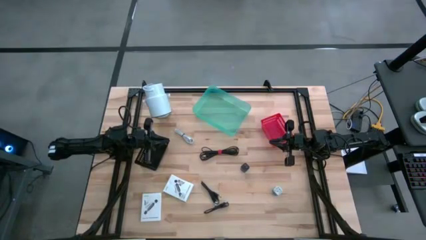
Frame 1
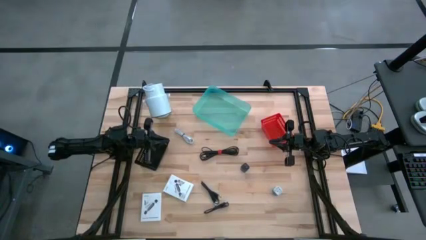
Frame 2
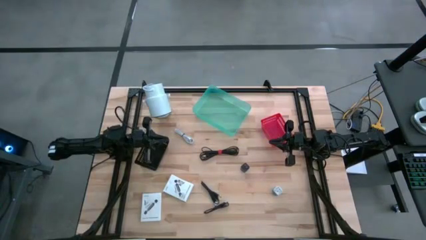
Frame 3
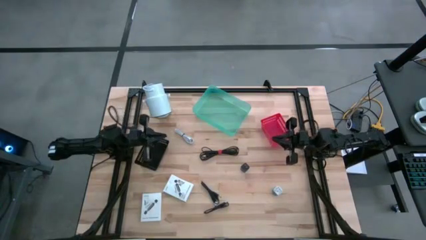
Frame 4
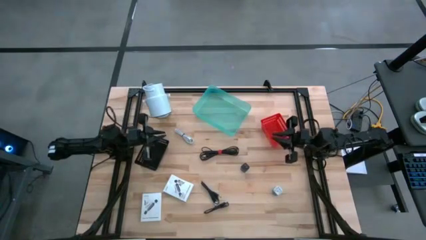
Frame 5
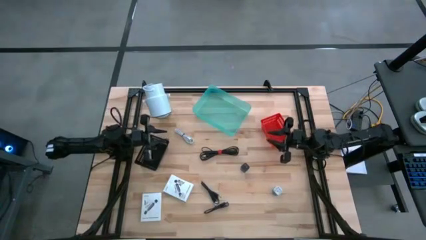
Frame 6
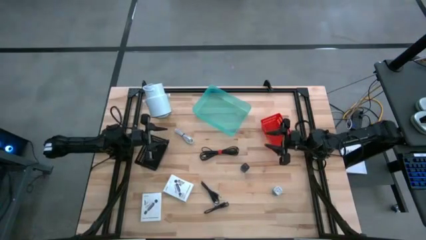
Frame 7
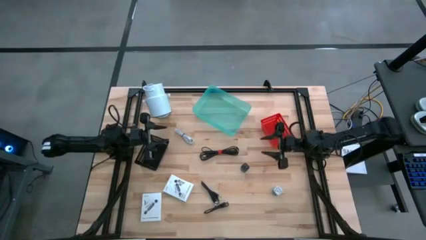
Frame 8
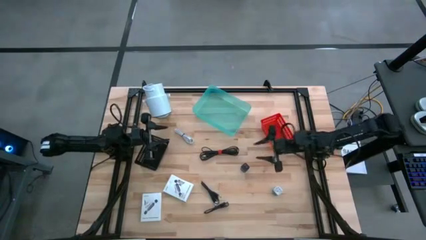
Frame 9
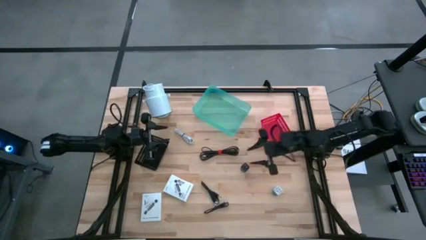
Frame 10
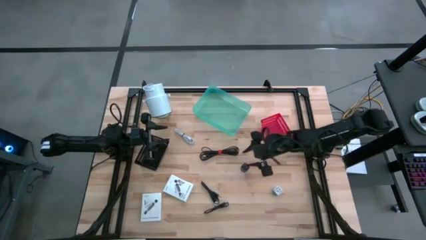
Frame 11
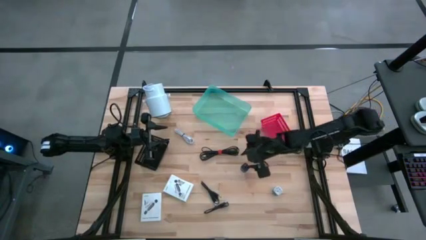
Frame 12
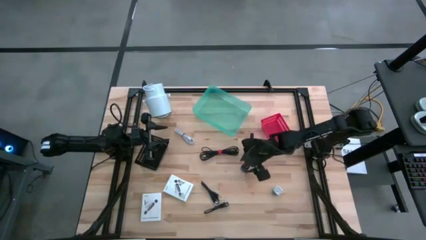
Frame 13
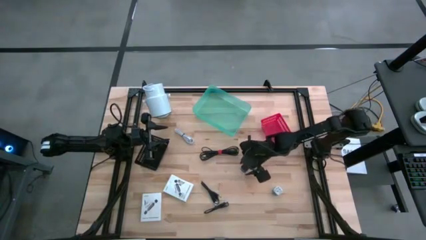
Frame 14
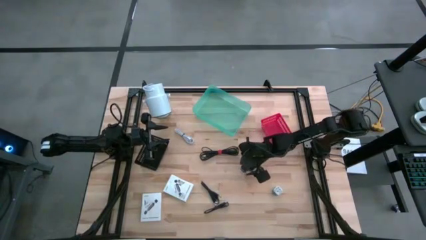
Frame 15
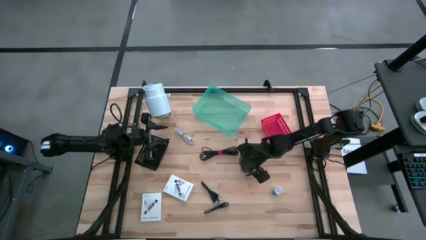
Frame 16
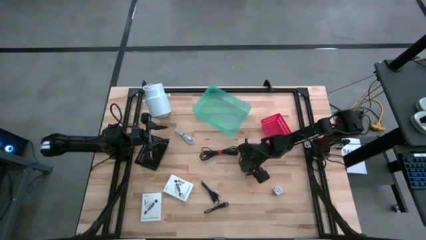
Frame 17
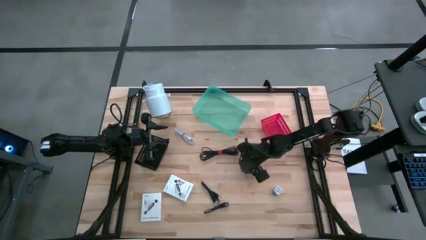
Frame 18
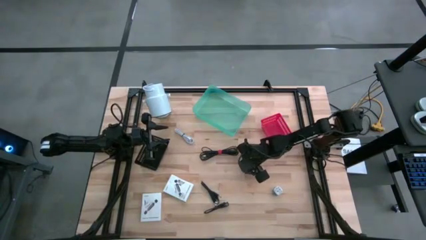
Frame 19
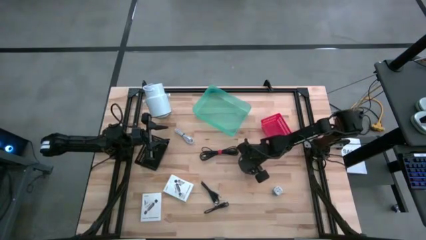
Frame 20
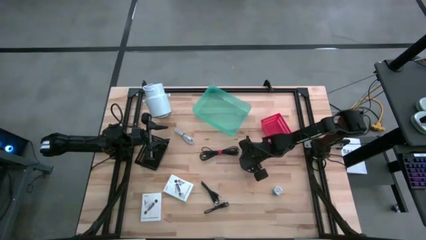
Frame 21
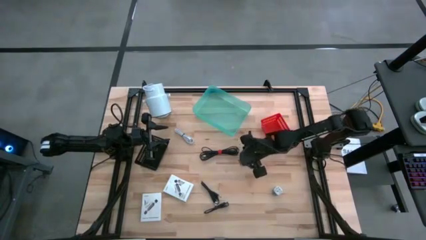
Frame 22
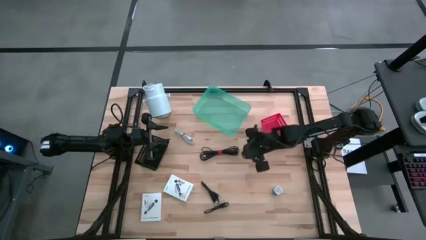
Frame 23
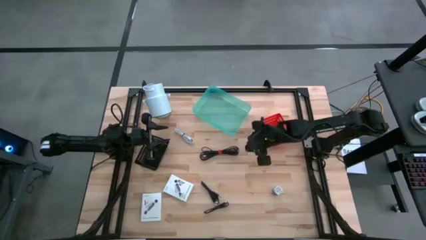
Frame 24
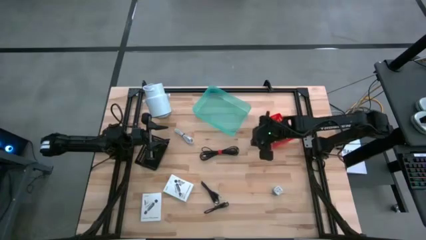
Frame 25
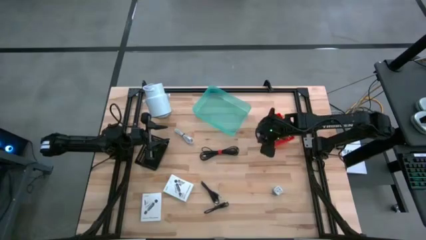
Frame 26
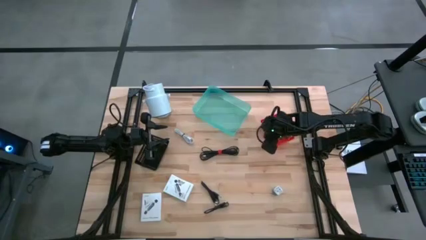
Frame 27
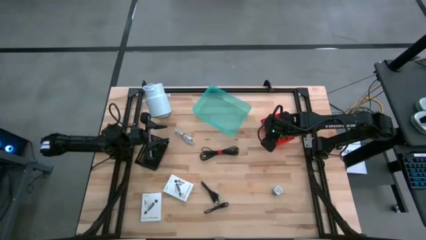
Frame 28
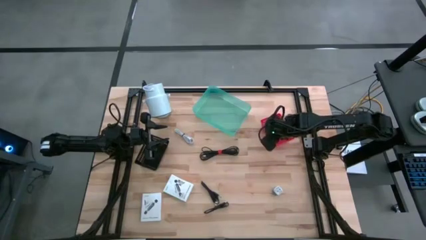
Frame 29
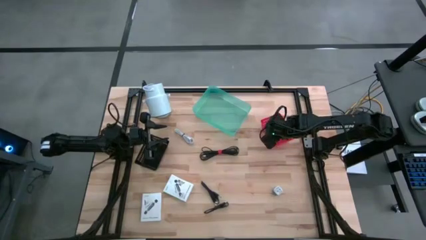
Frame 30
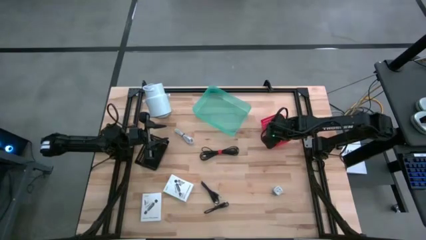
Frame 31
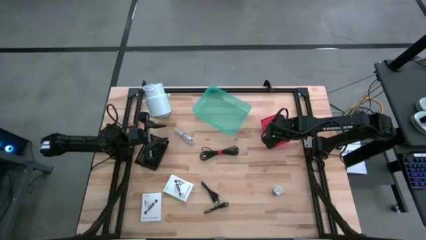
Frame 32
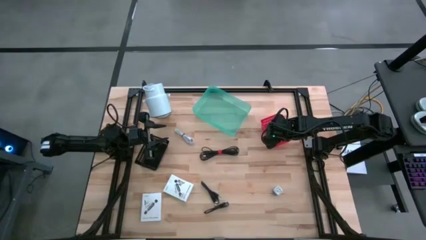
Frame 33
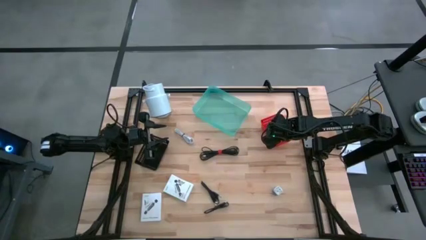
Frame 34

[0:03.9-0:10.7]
Task: Pick and place items into bin
Put the black charger adapter into the red bin

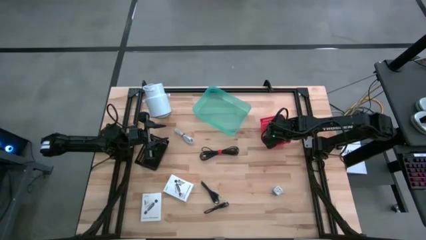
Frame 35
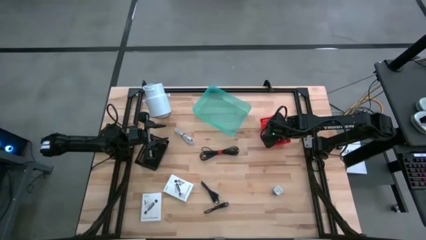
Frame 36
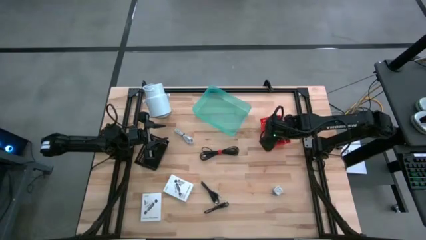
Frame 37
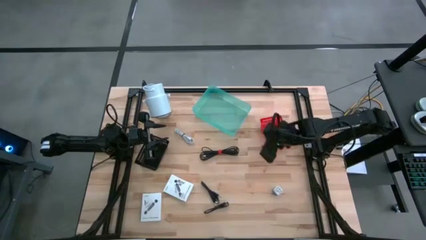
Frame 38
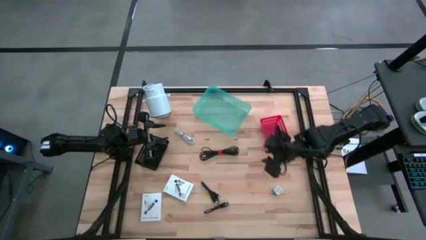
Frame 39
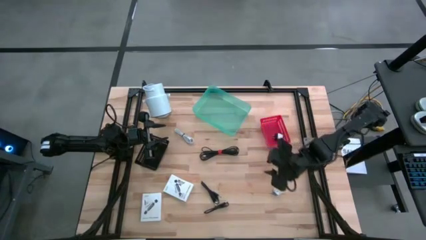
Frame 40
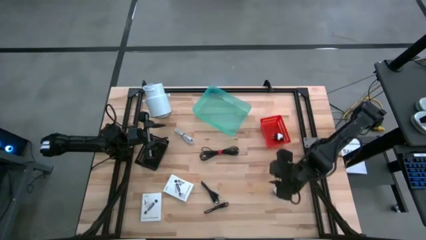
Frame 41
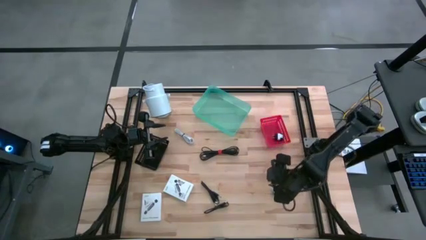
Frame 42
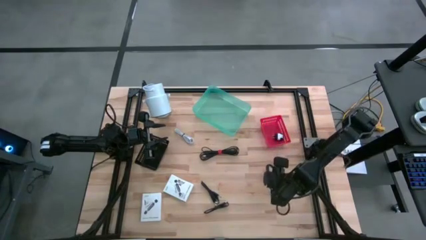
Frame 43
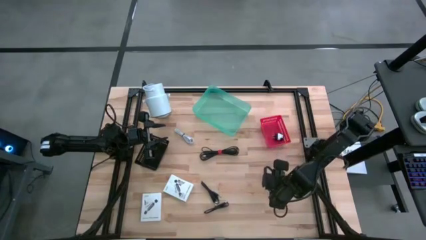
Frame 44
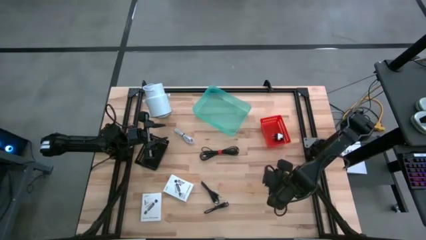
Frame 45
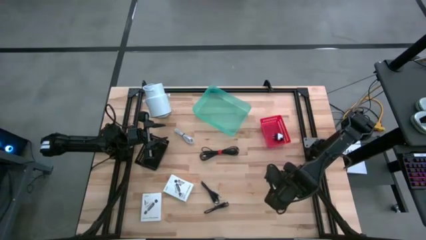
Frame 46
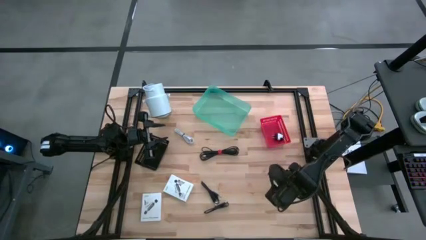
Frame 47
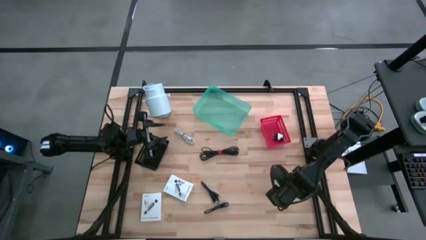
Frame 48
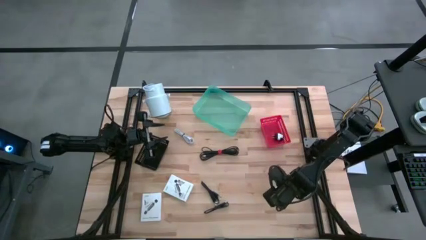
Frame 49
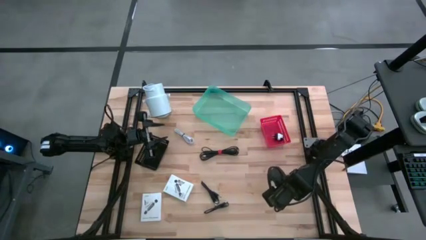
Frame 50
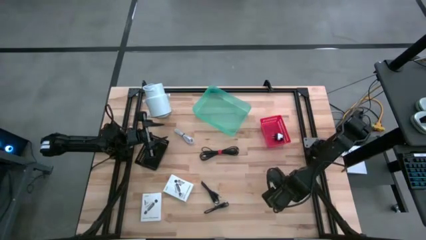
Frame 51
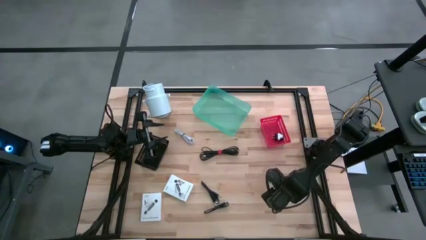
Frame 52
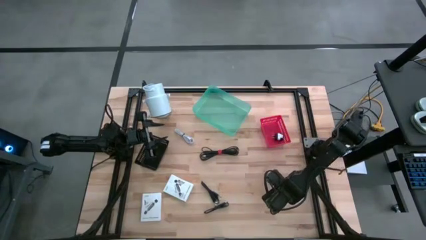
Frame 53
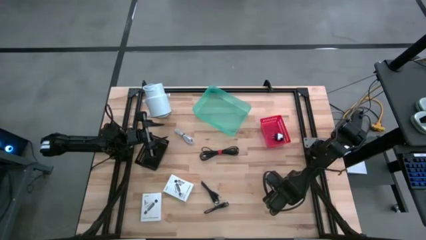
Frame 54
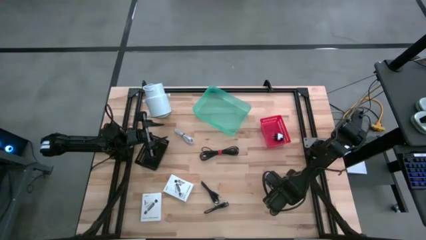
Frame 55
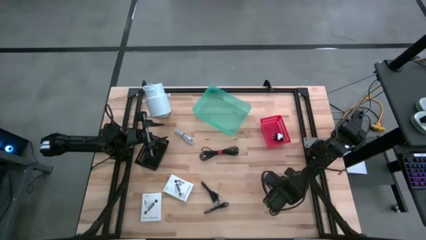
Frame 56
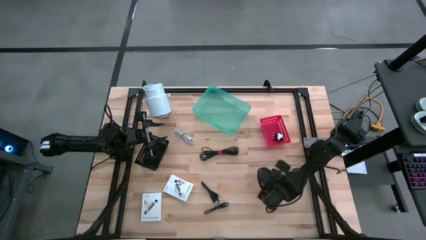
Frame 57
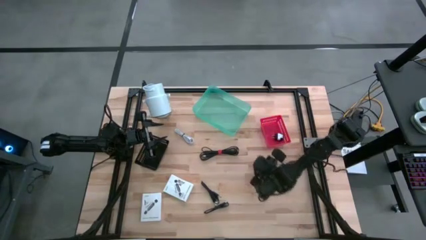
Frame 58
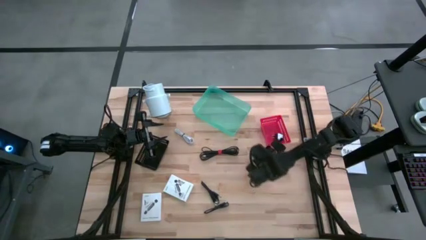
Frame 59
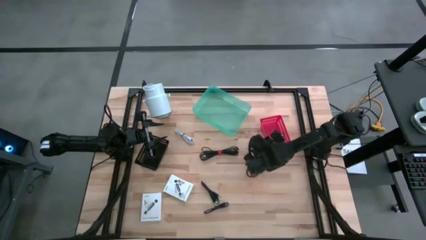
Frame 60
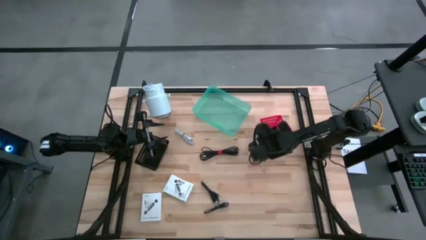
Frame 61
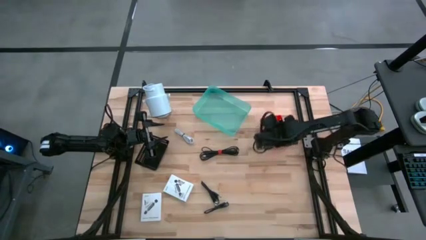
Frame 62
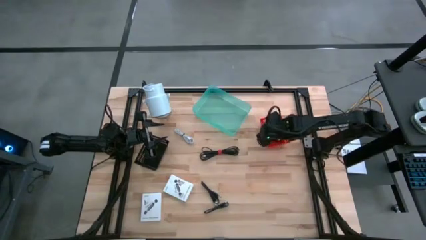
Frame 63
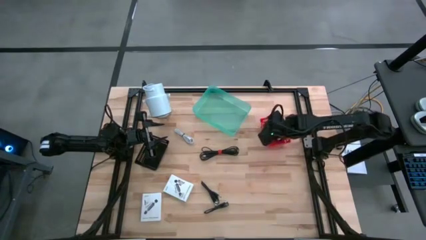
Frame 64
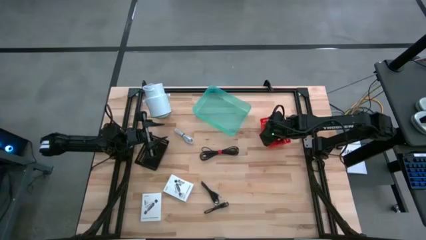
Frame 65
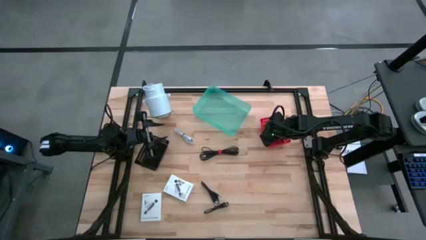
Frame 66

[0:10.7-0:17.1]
Put the white charger adapter into the red bin

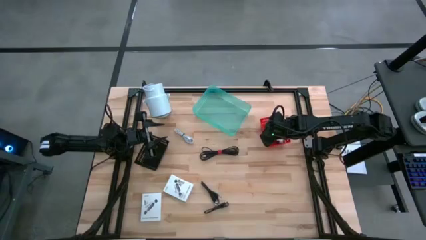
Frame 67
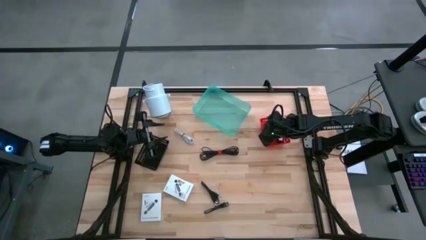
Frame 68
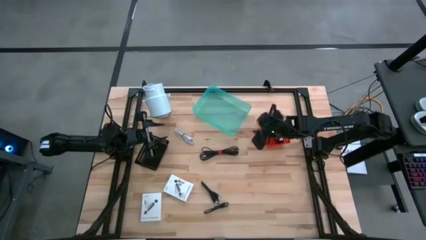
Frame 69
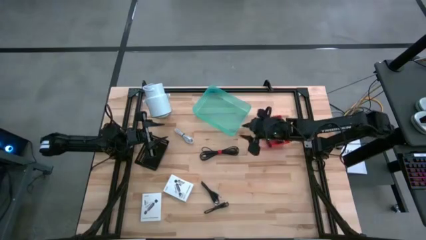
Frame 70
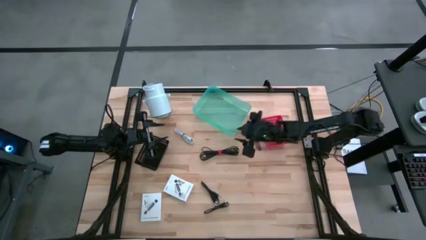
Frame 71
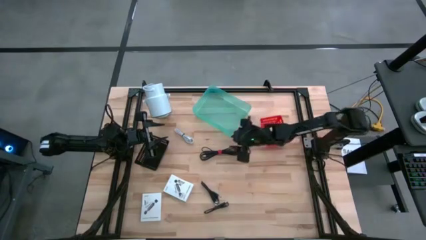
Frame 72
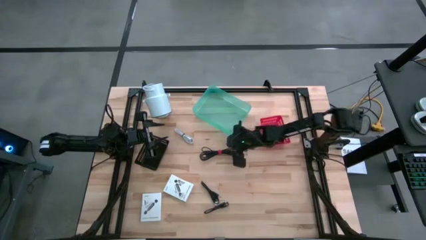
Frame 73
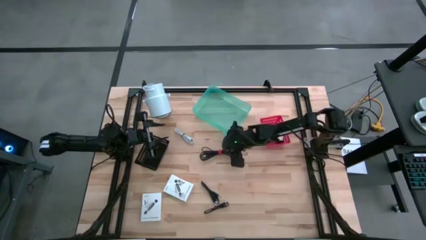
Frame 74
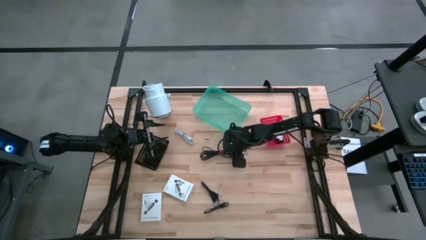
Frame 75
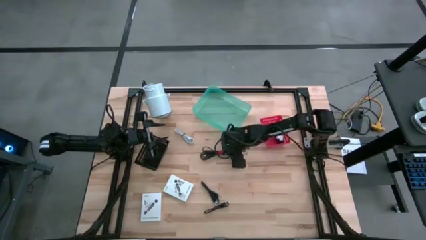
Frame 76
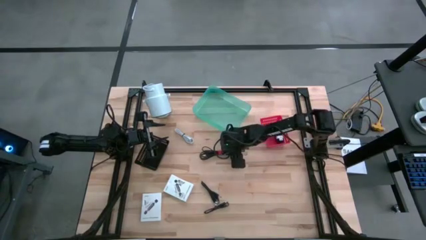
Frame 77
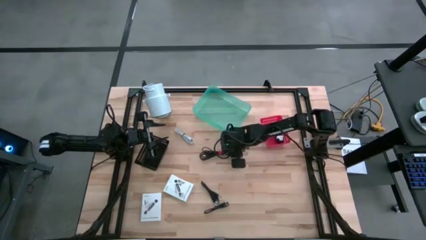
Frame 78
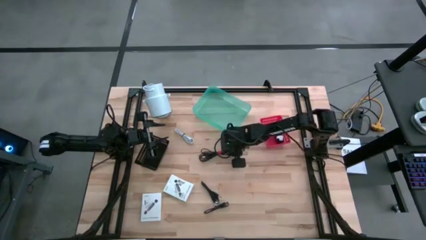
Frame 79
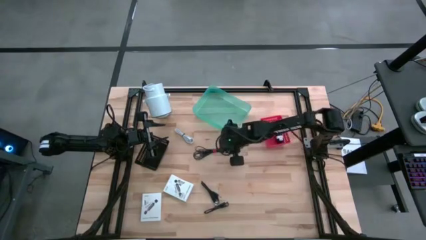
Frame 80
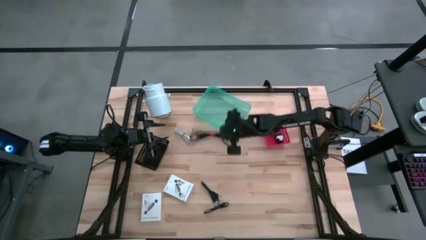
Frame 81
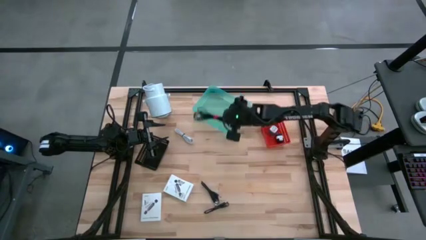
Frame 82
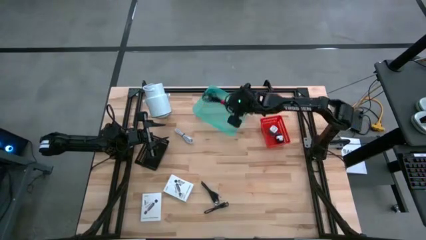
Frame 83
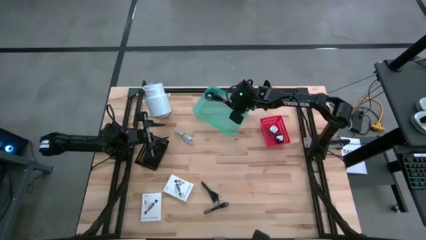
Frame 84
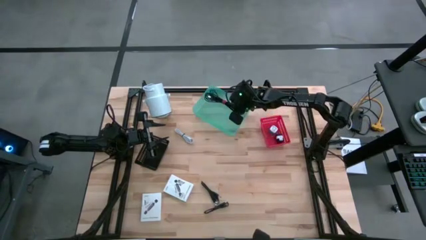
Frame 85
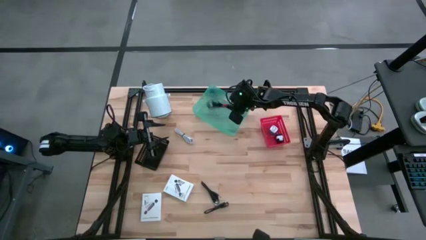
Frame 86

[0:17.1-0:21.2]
Put the top black charger cable into the green bin
